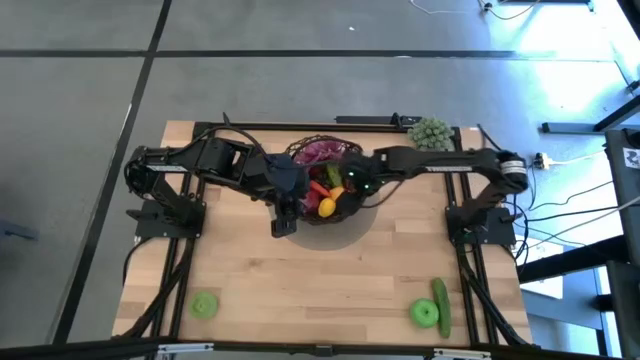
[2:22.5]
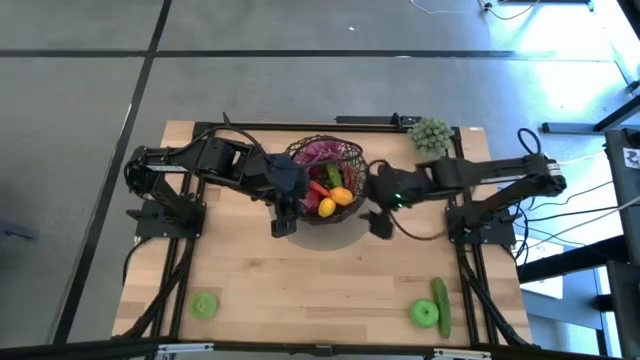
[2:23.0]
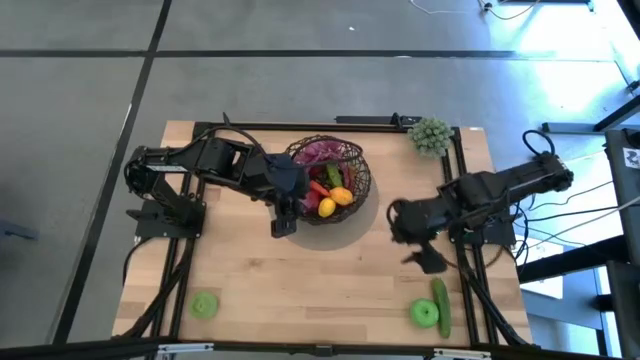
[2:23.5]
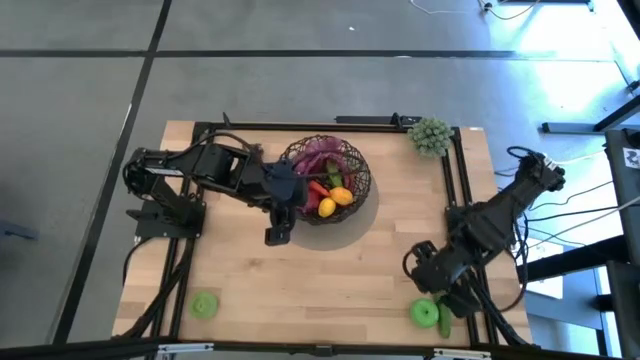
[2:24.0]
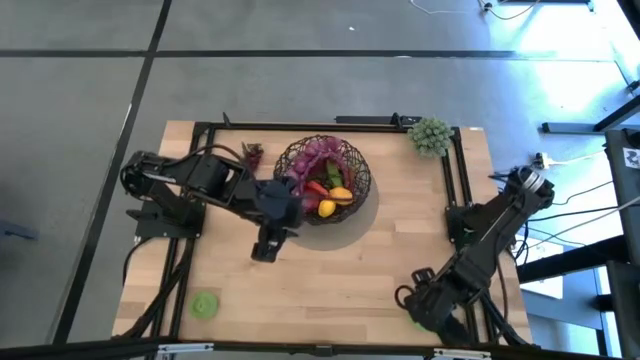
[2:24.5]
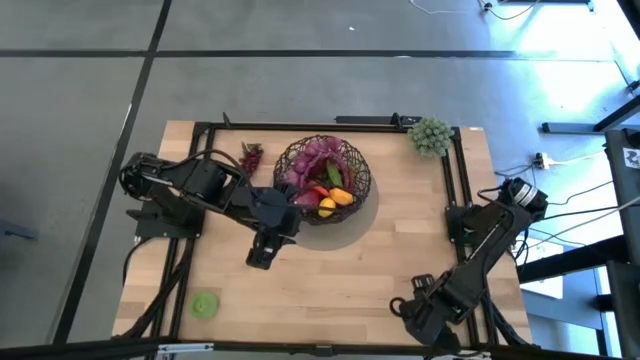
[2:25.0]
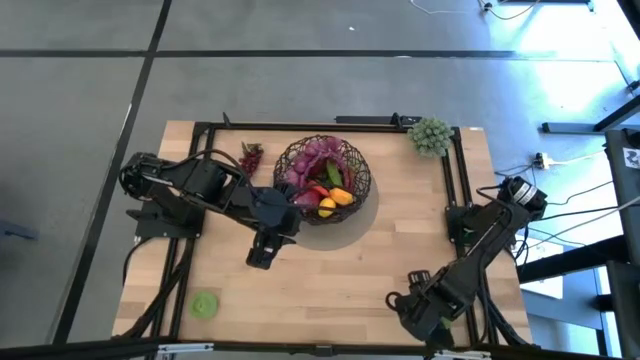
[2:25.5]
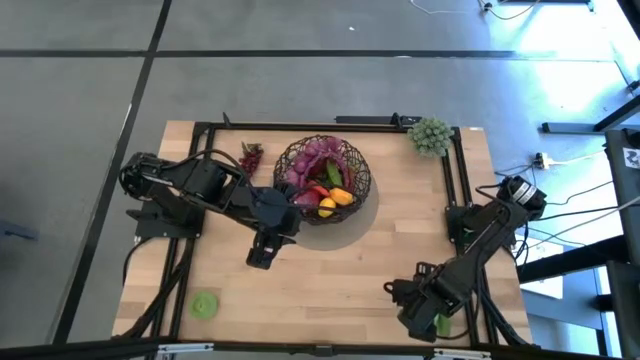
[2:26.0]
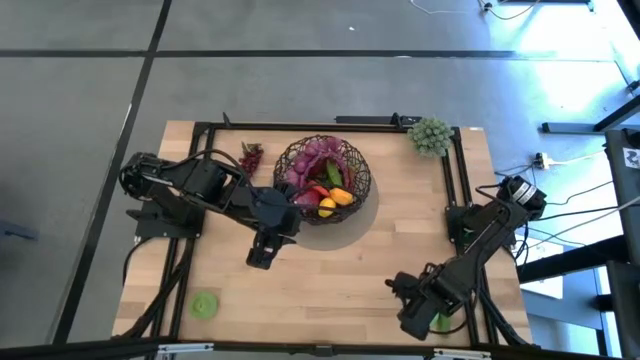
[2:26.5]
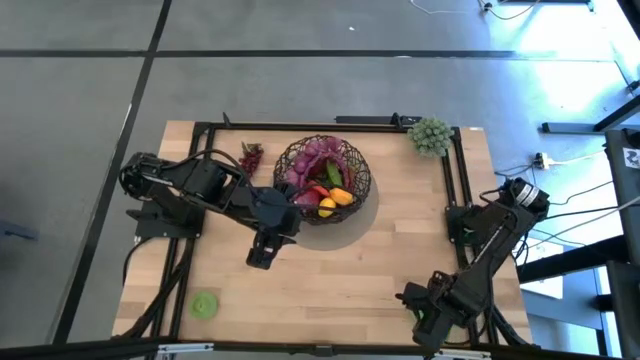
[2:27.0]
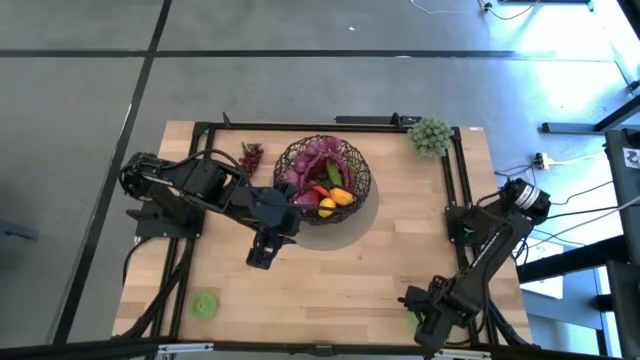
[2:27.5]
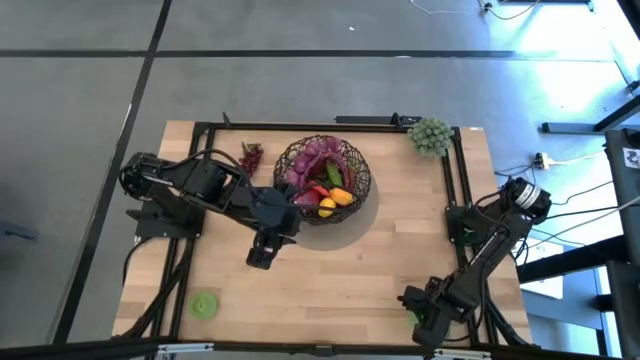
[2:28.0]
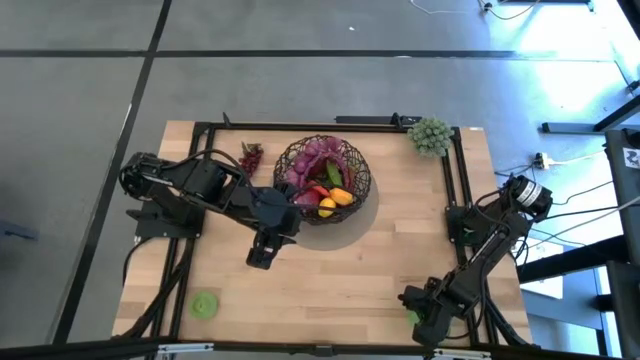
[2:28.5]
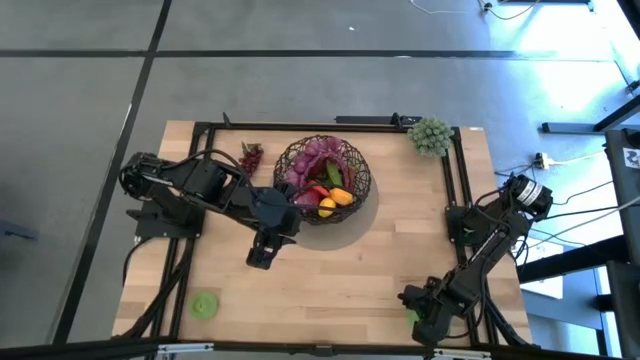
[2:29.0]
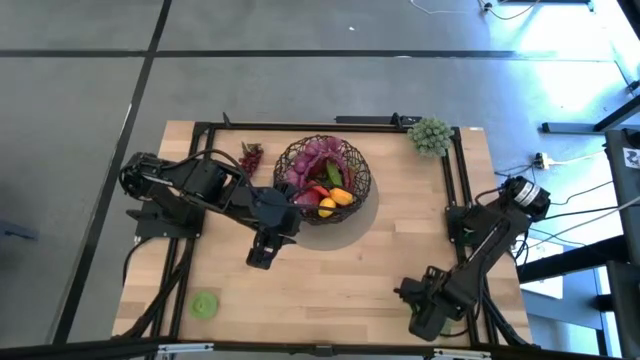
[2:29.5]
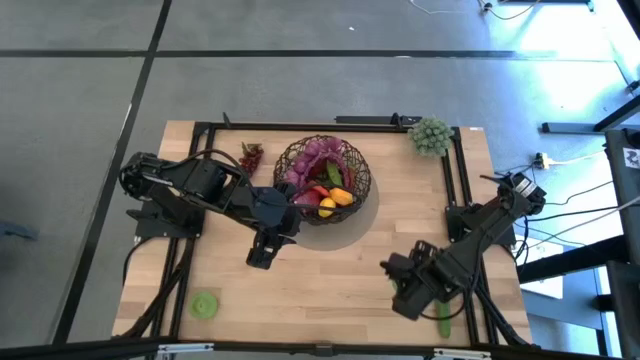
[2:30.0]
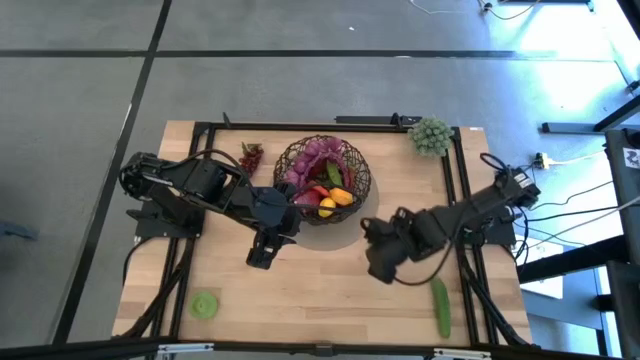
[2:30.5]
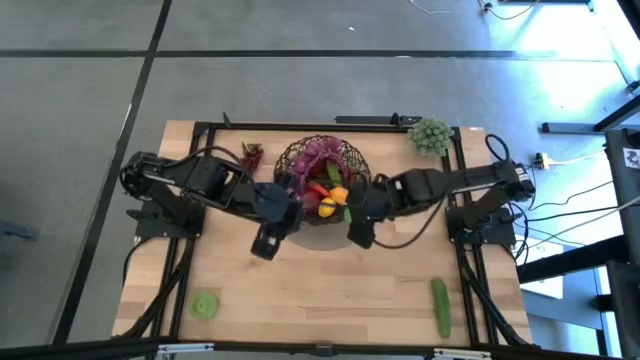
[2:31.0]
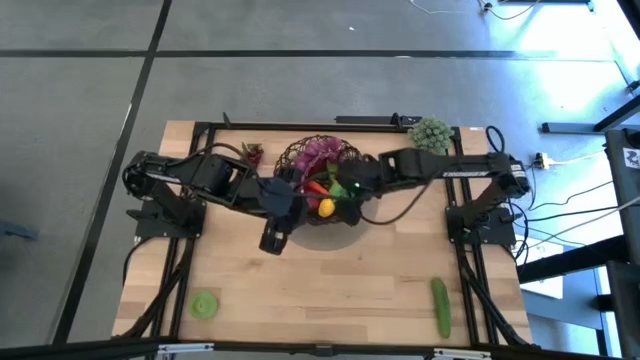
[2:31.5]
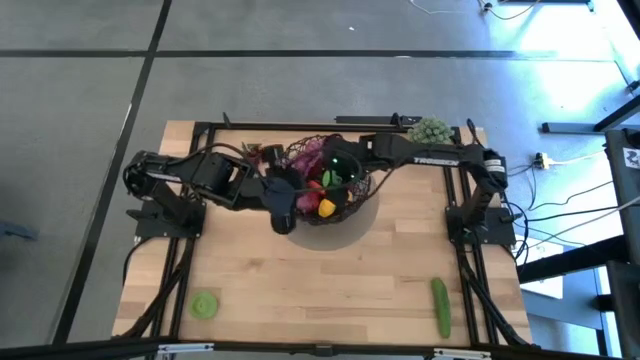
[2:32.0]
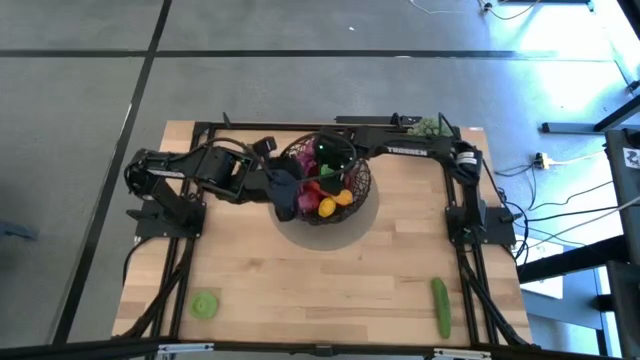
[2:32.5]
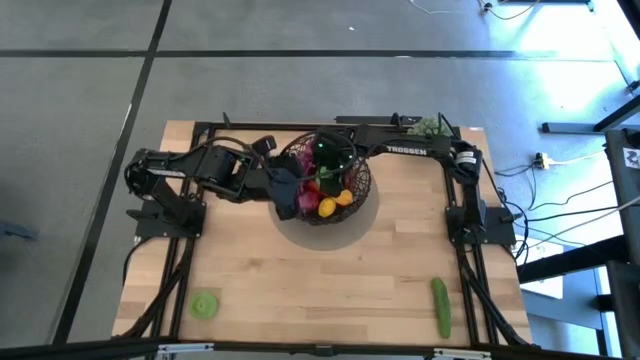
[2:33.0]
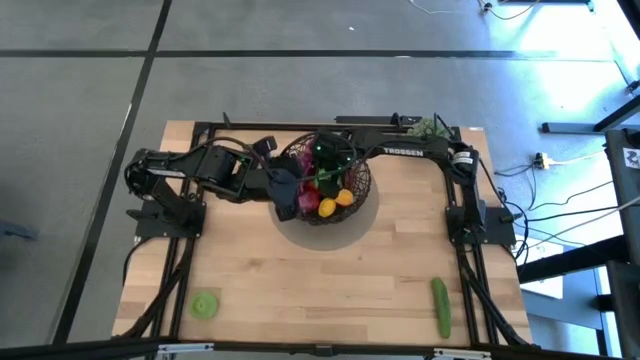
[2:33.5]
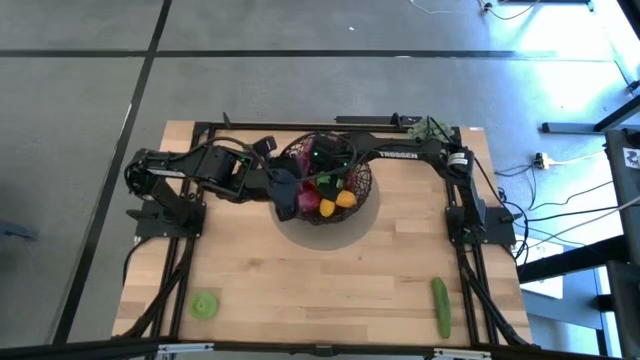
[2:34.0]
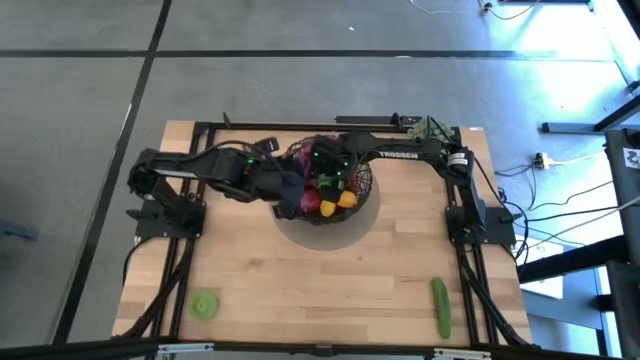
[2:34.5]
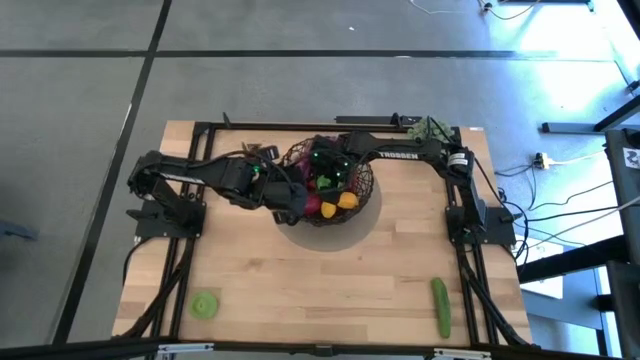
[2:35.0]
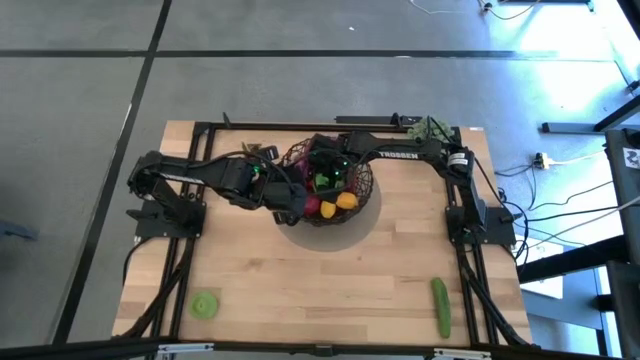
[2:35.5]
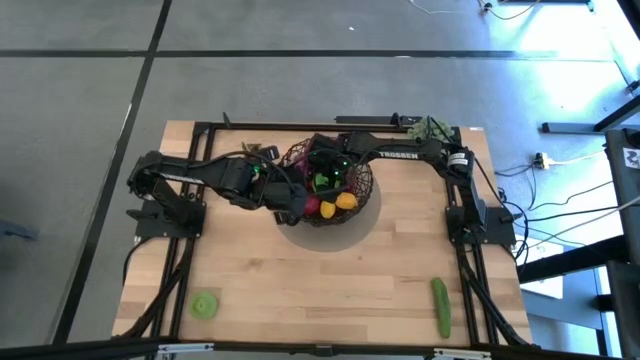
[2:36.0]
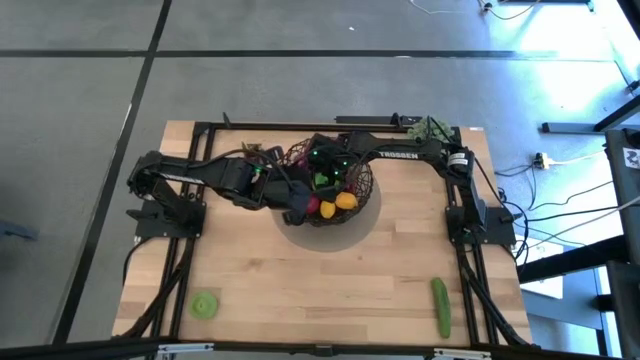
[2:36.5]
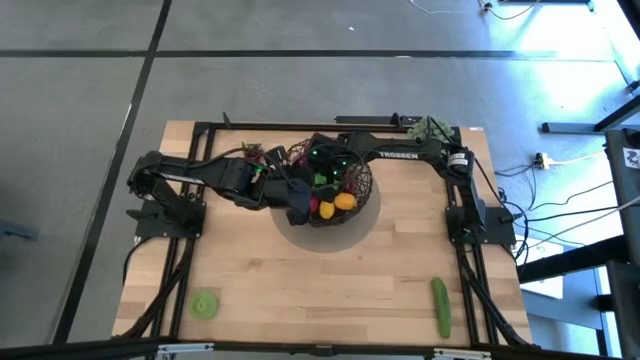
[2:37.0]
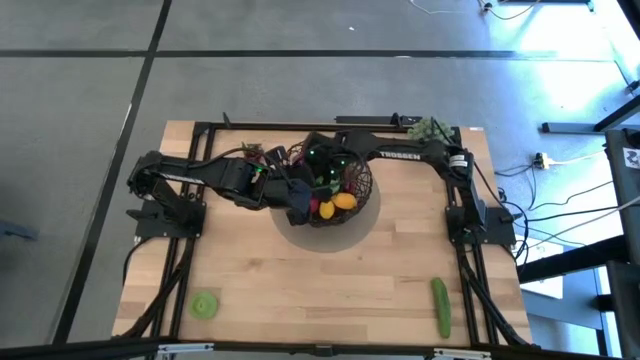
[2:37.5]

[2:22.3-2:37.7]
Task: Build produce basket
Put the green apple into the wire basket
